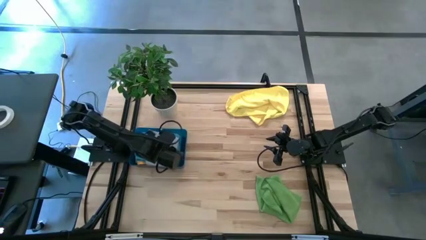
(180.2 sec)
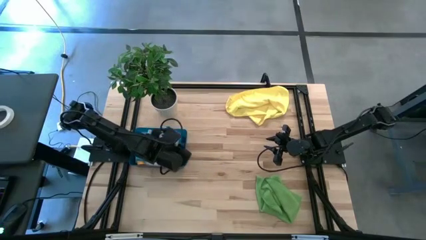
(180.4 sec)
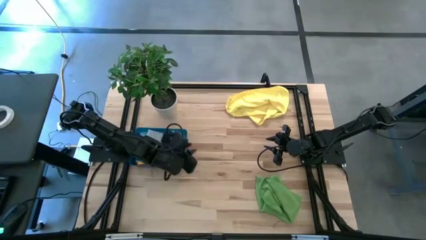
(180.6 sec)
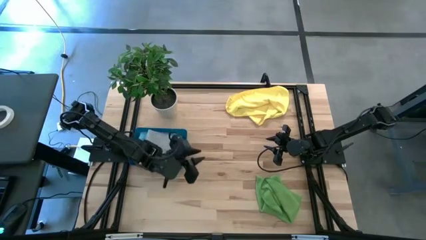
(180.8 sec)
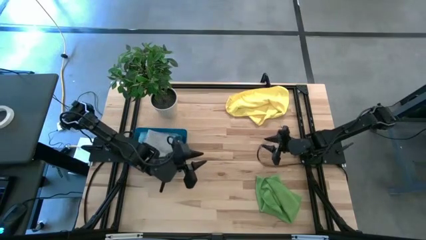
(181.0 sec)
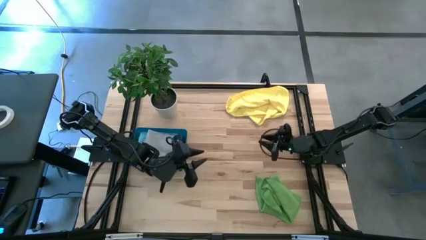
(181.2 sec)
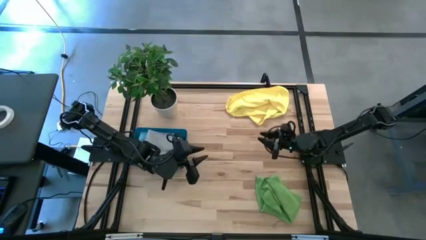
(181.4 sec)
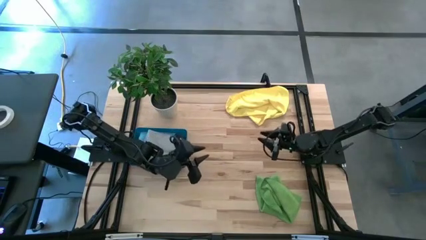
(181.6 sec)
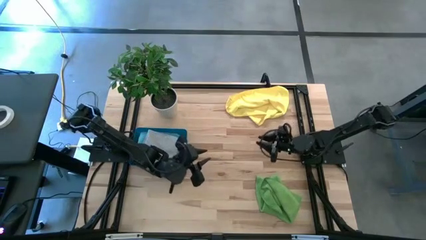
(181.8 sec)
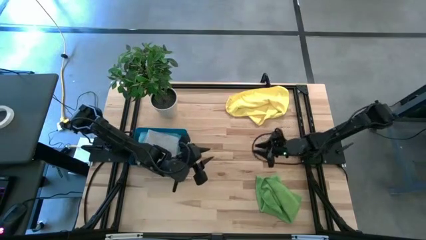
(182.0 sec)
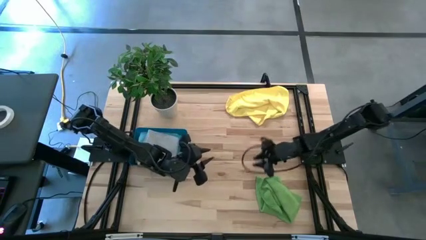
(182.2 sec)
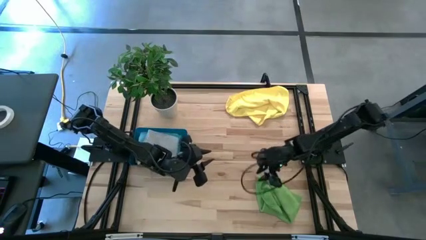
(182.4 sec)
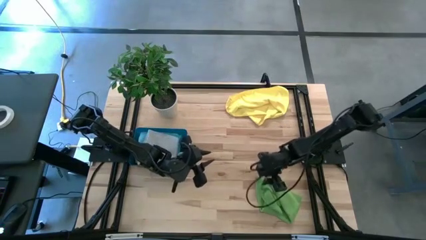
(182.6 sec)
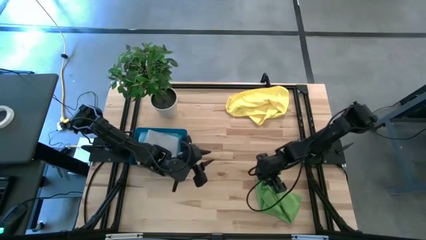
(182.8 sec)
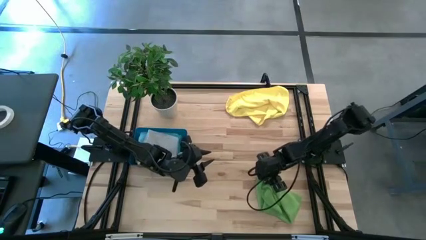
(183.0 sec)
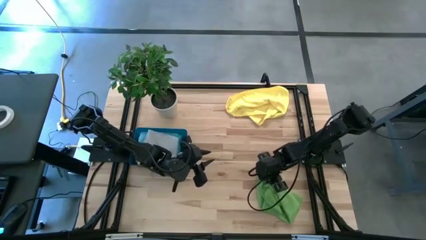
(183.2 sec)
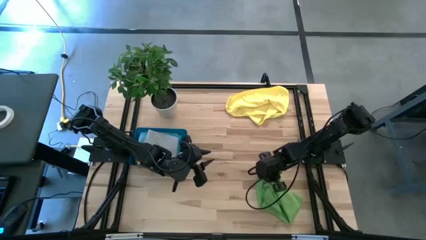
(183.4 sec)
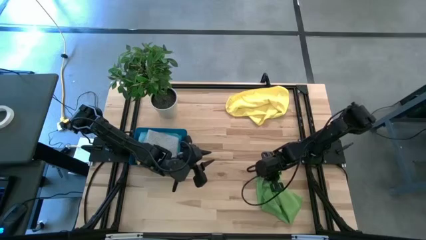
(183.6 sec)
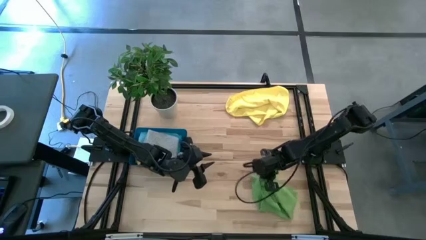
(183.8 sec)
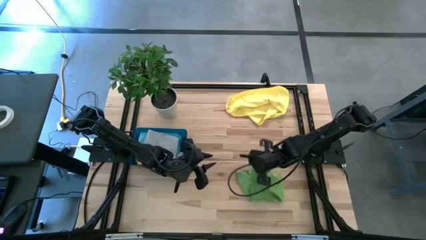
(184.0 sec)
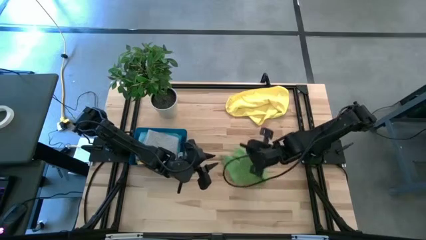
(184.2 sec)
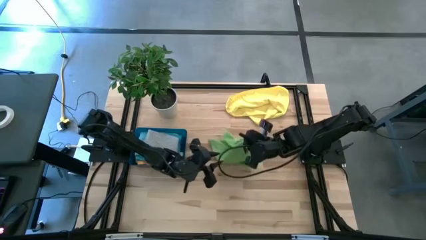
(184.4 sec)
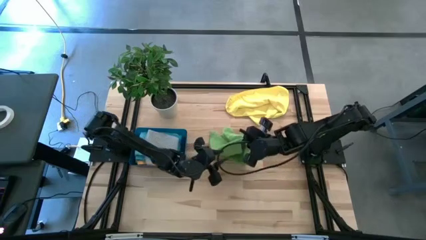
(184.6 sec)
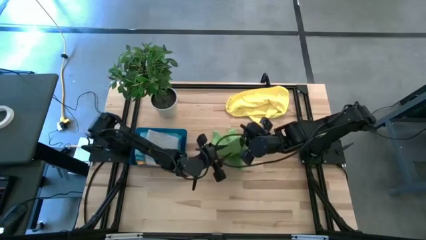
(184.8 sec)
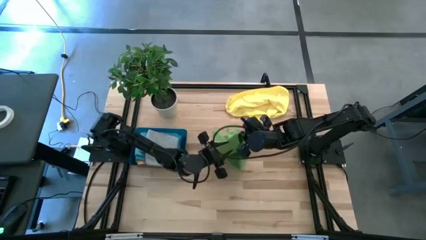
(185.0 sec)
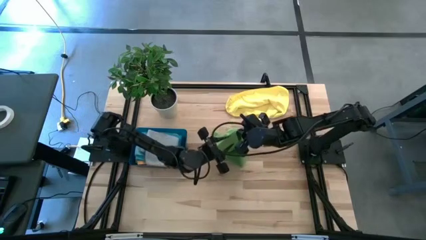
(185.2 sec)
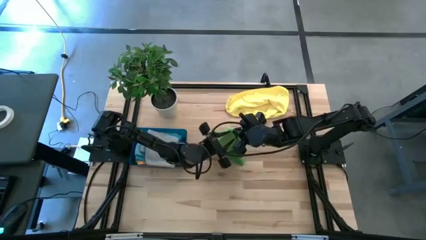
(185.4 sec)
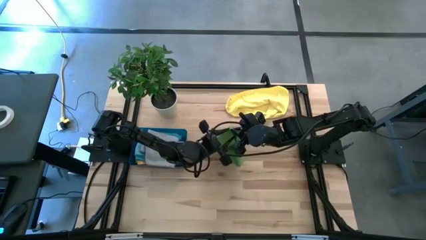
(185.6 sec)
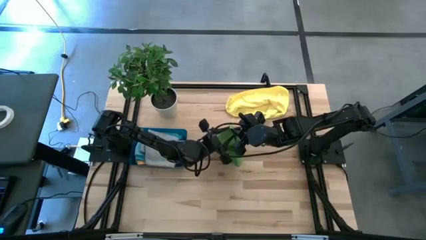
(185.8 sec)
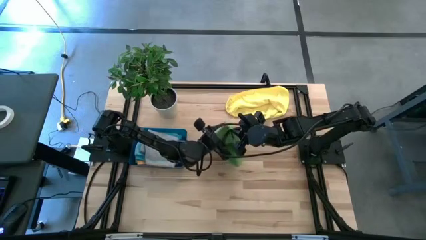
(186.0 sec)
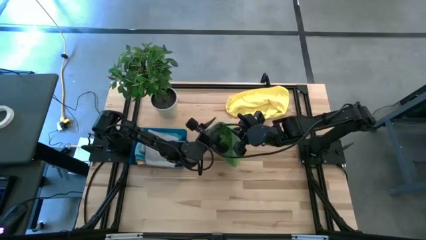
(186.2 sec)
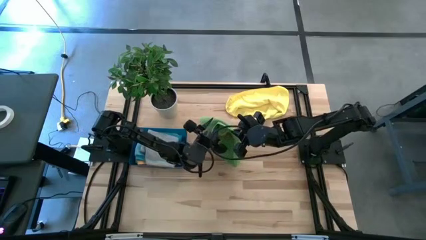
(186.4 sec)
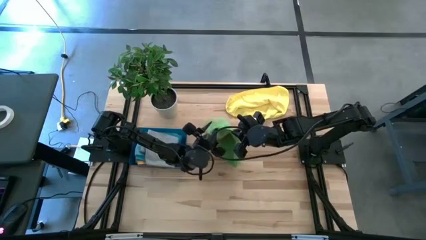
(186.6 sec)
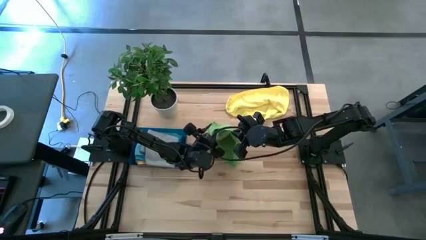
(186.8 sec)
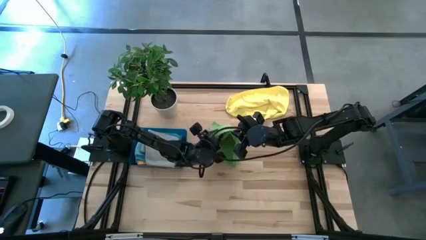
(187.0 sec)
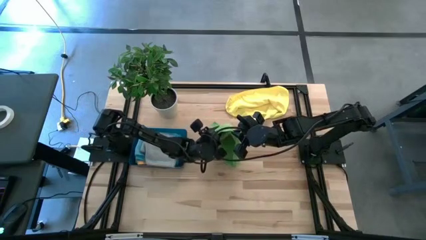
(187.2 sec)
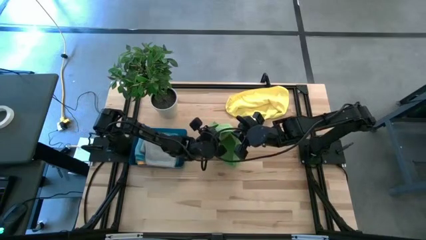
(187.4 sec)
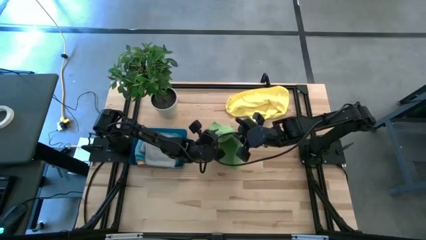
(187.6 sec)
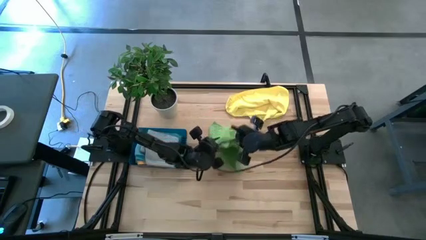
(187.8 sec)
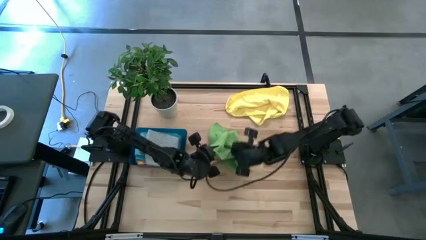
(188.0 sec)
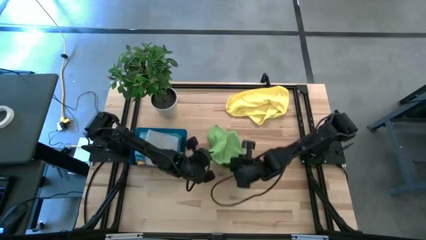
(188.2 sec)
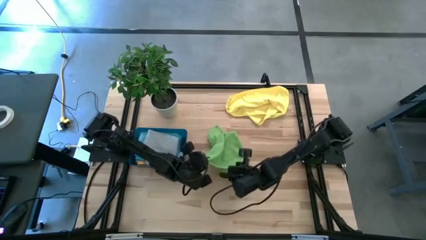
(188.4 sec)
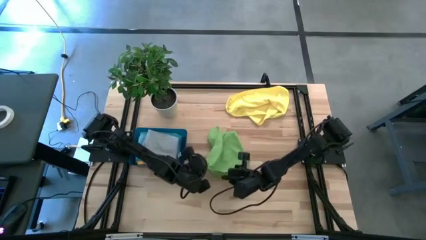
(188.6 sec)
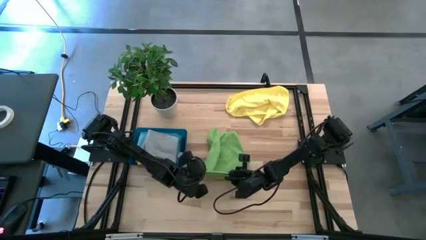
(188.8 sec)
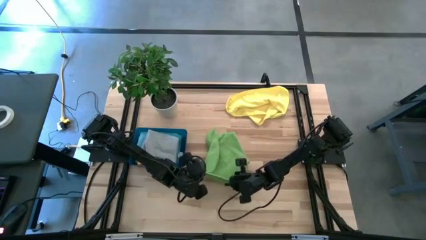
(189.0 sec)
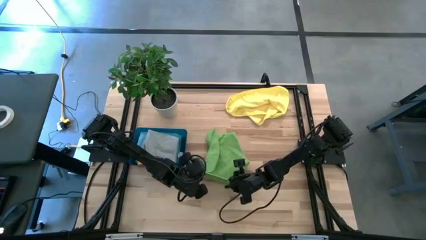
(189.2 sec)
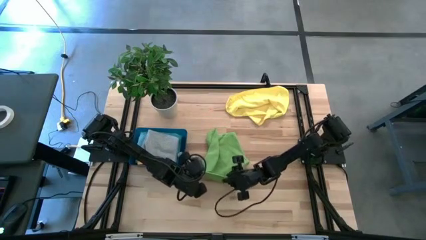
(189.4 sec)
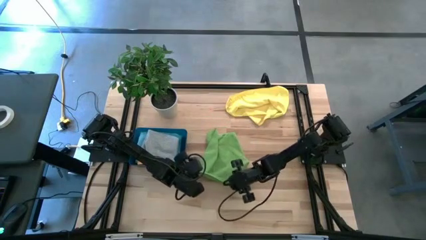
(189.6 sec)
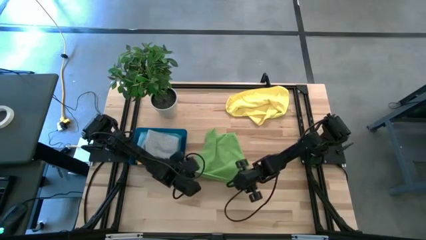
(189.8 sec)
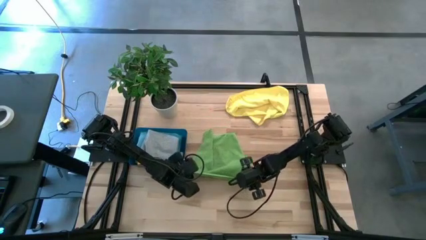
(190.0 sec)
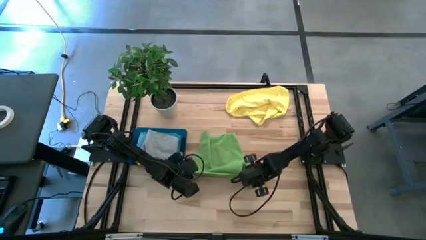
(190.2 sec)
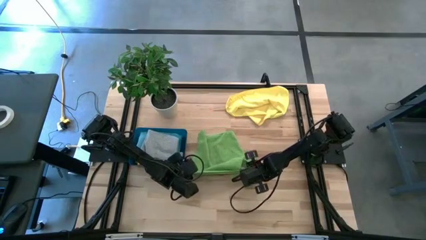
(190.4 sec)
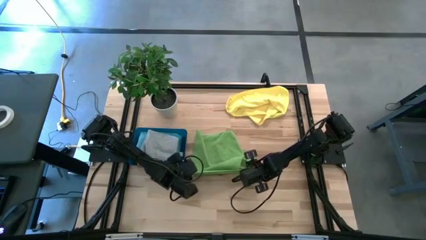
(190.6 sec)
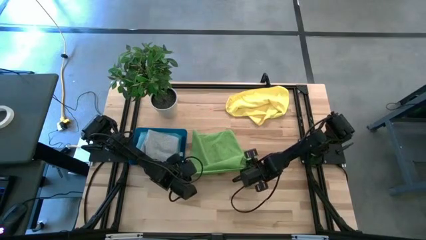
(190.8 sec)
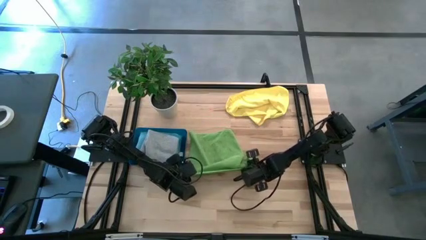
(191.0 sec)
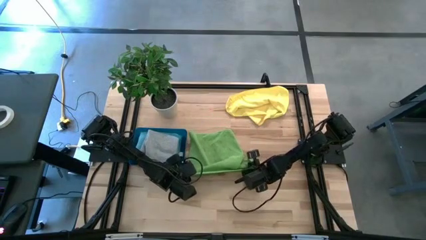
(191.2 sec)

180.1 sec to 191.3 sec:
Task: Fold microfiber towels
Fold the green towel on the table

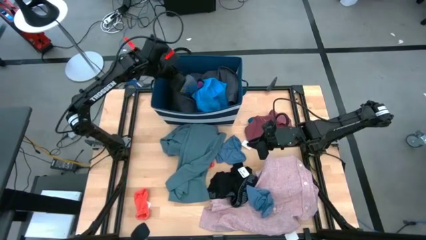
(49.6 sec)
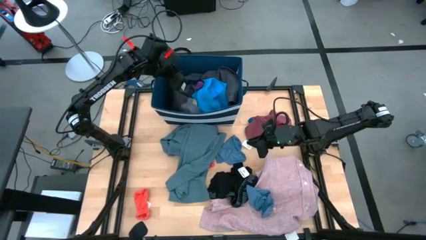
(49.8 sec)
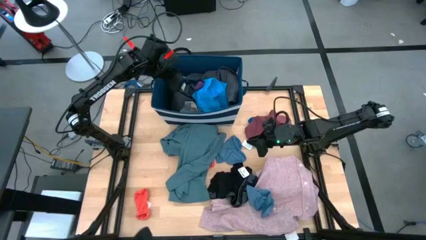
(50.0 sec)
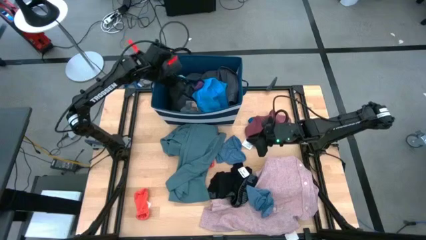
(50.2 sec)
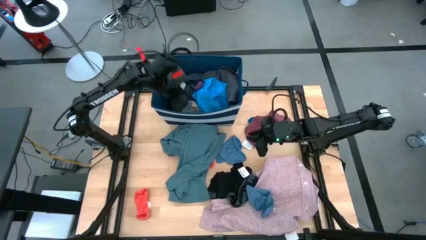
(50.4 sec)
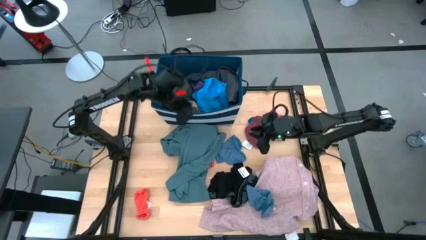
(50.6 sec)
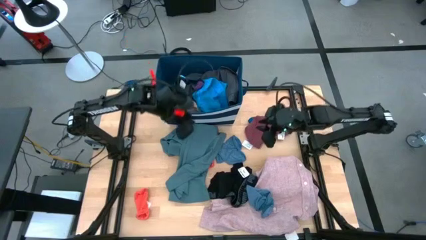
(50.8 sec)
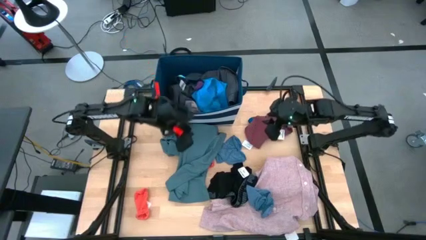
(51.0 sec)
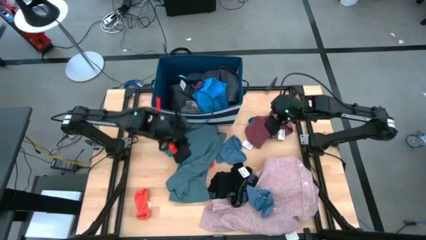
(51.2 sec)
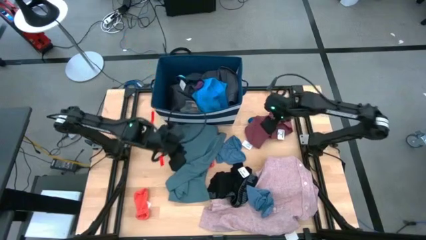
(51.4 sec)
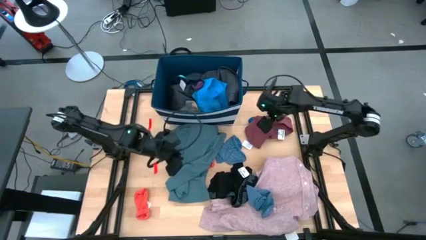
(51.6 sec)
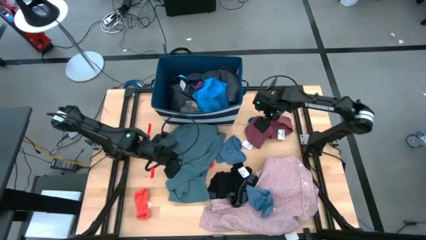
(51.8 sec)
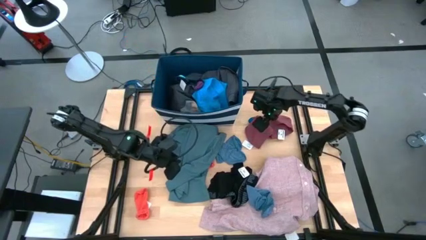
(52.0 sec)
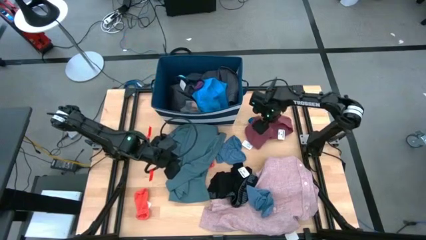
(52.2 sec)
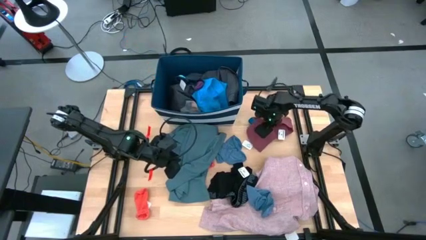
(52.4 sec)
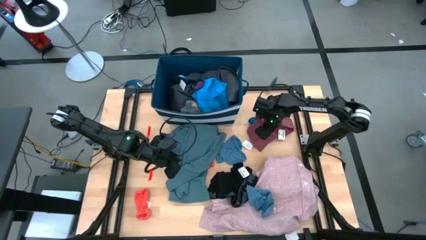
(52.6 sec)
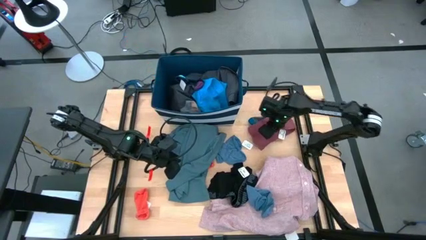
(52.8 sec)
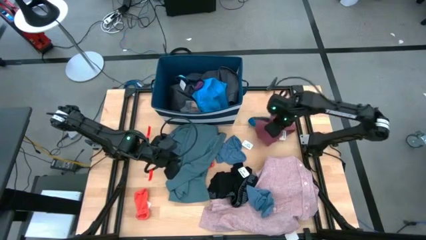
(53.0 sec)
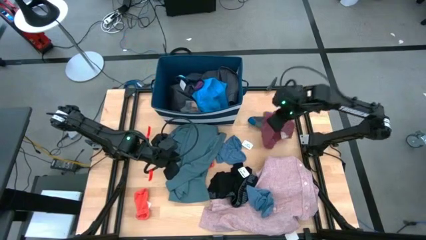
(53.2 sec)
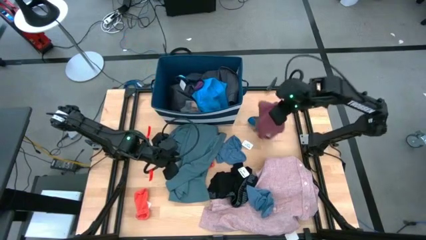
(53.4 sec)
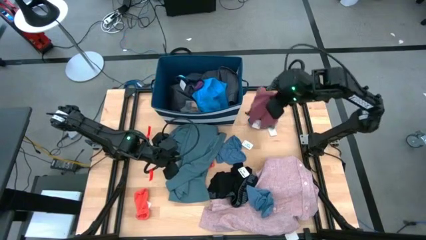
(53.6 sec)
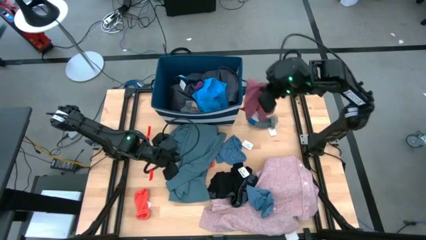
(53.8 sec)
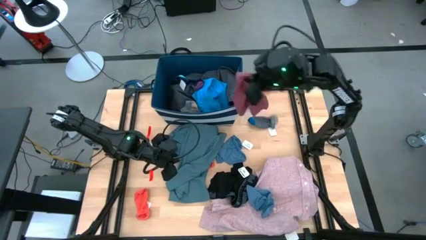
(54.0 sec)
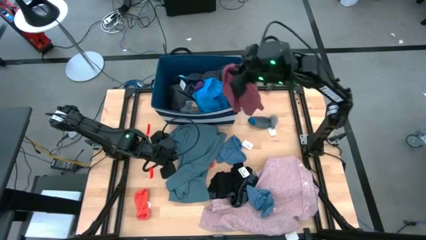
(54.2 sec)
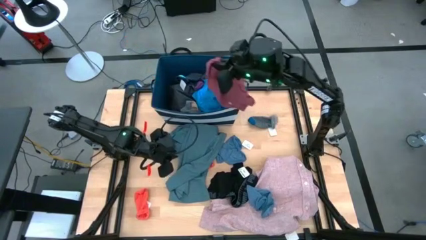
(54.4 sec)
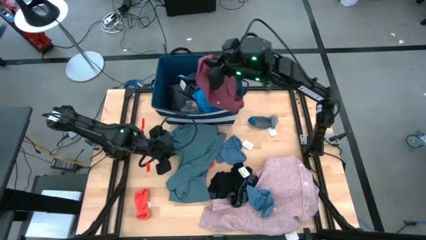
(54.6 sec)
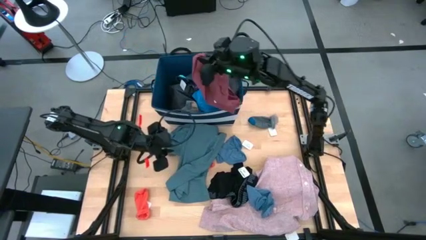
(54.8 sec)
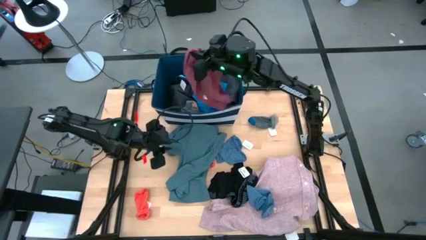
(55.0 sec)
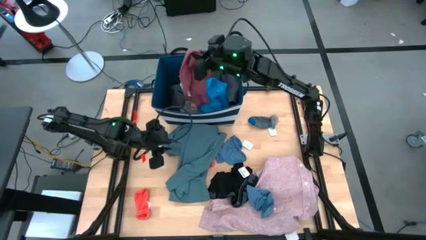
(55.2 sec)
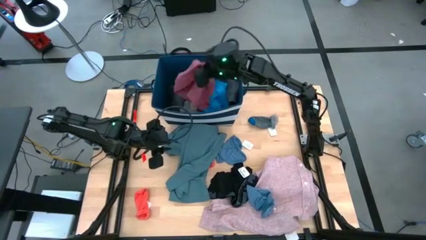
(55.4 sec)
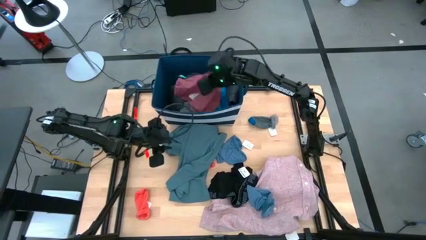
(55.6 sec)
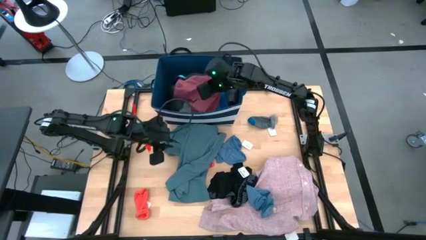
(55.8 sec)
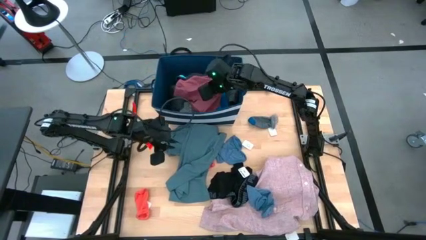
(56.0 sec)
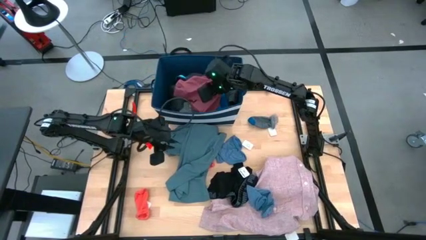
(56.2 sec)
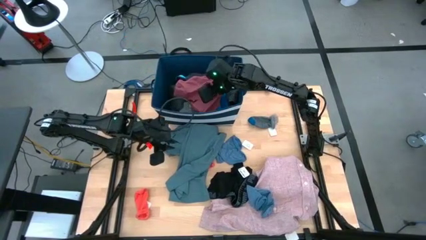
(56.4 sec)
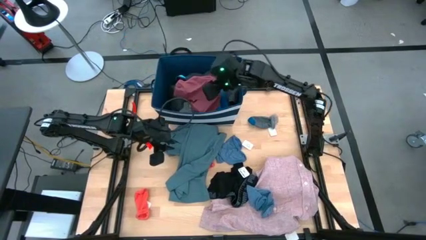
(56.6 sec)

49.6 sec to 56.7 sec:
Task: Sort clothes
Put the dark red underwear into the blue bin
